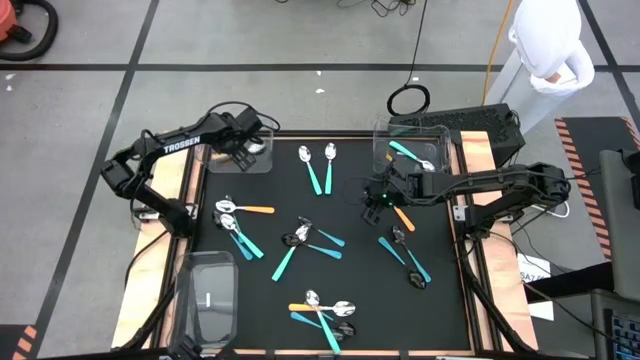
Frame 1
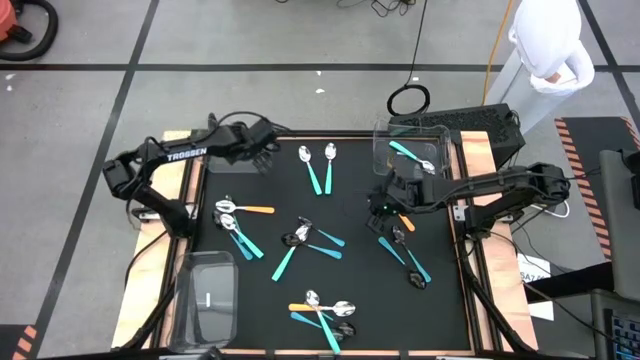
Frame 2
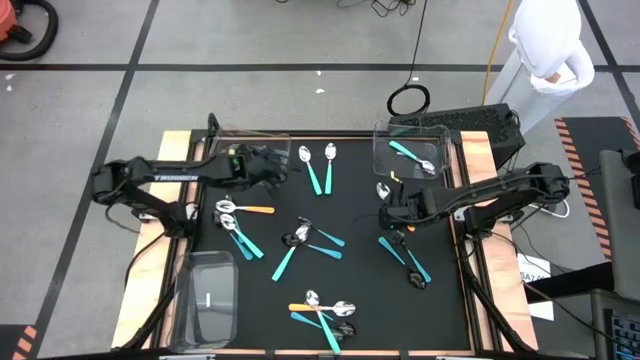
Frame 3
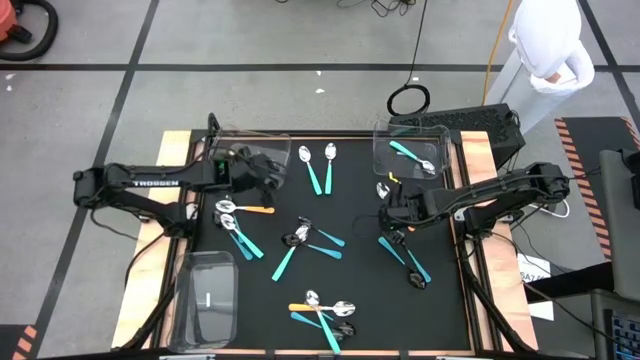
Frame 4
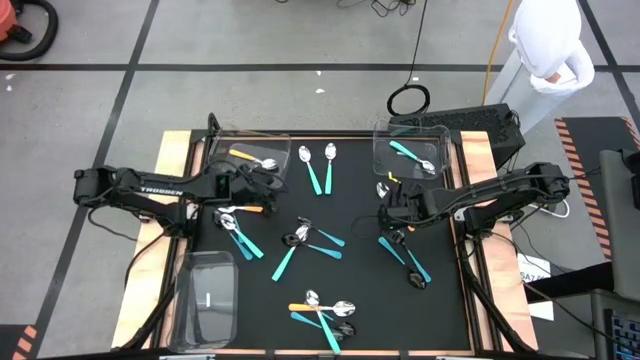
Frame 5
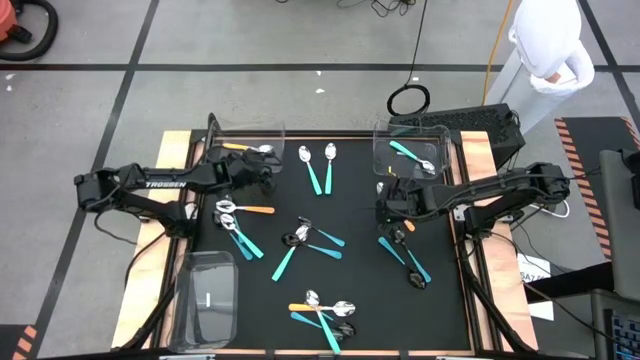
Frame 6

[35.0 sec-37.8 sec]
Task: Sort silverware by color (type)
Adjust the top left bin on the table

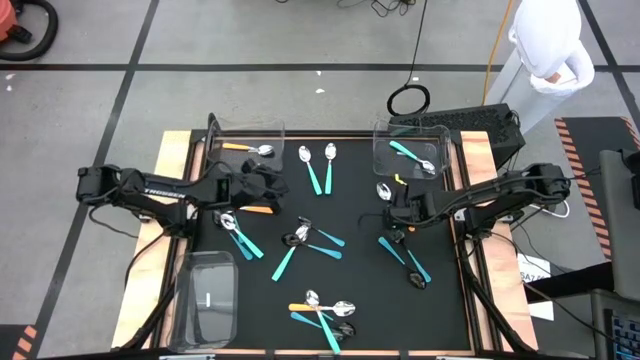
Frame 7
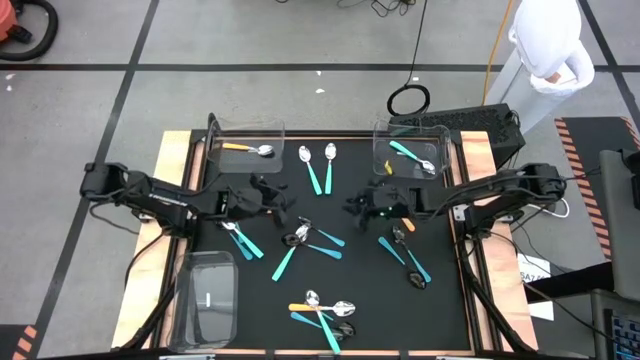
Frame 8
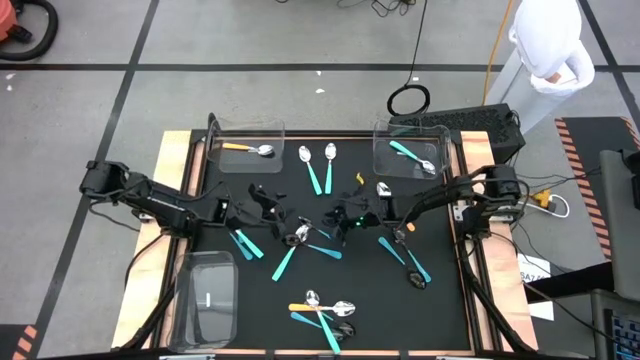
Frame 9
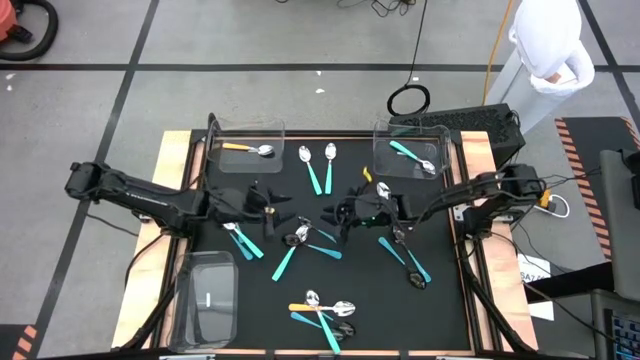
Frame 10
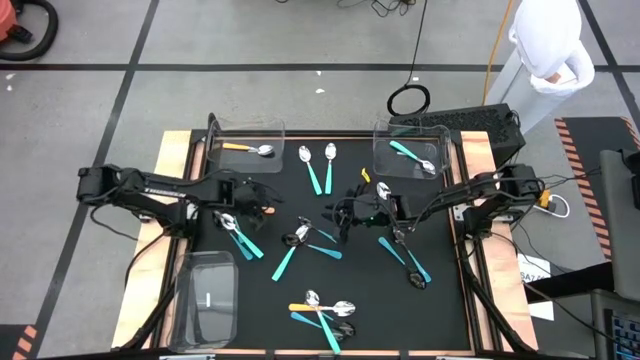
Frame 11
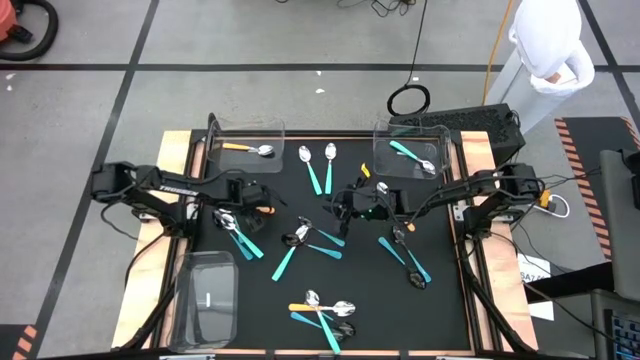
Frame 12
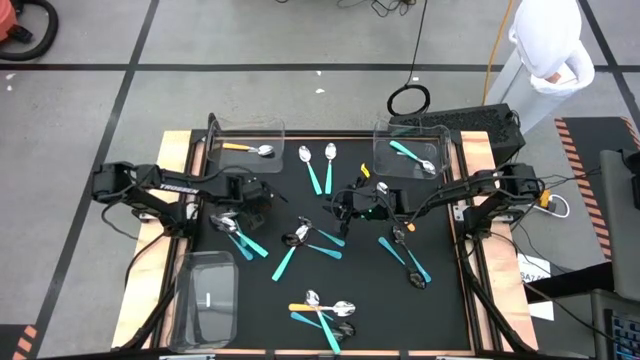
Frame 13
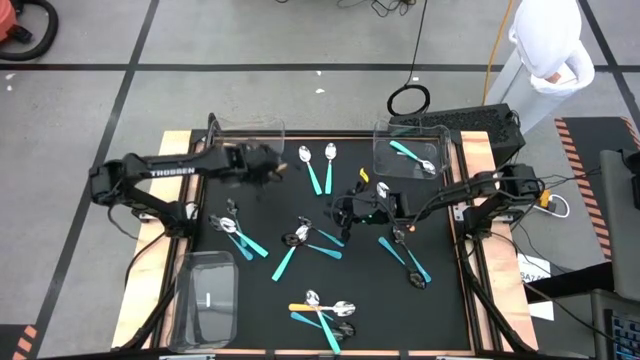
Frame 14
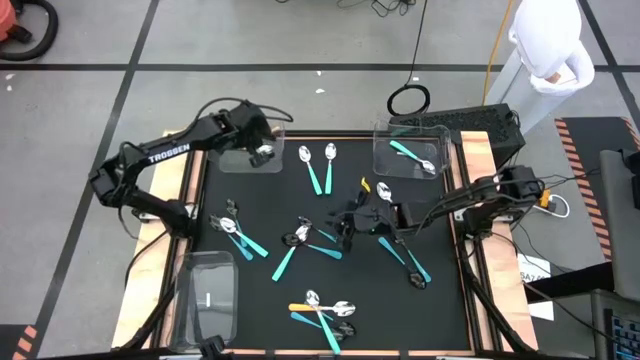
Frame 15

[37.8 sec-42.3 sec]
Put the top left yellow spoon into the top left bin

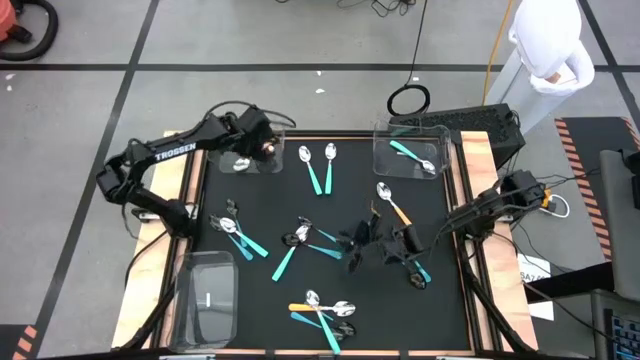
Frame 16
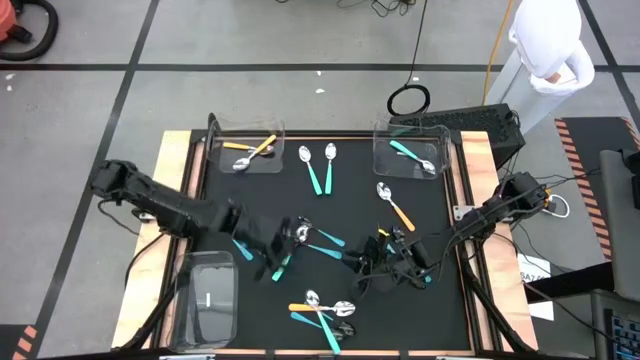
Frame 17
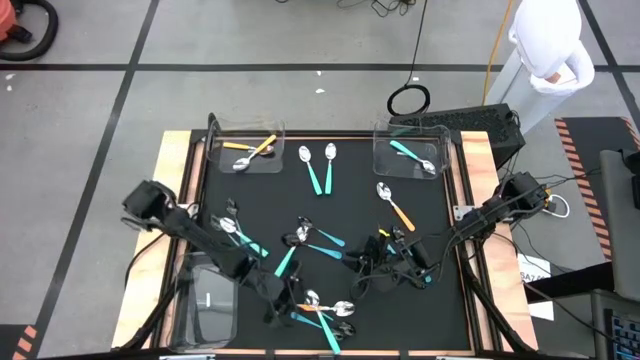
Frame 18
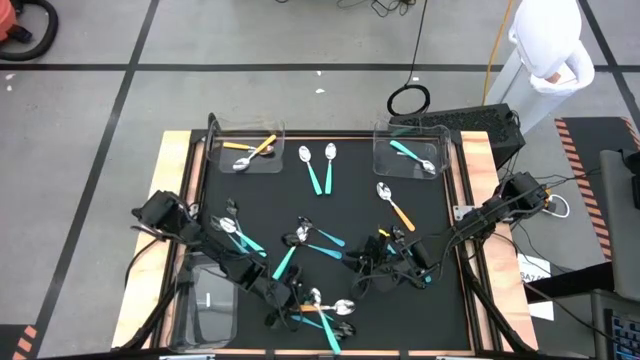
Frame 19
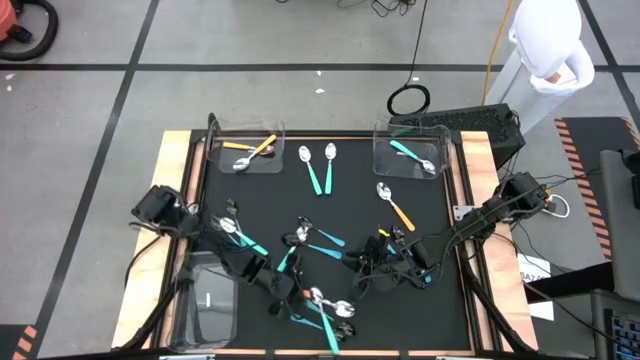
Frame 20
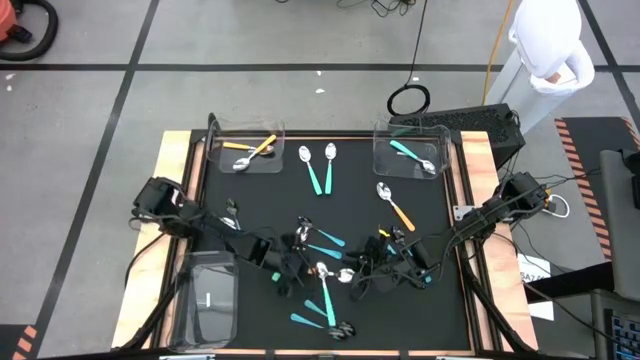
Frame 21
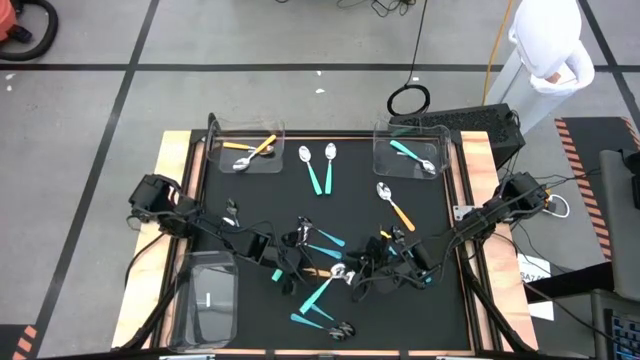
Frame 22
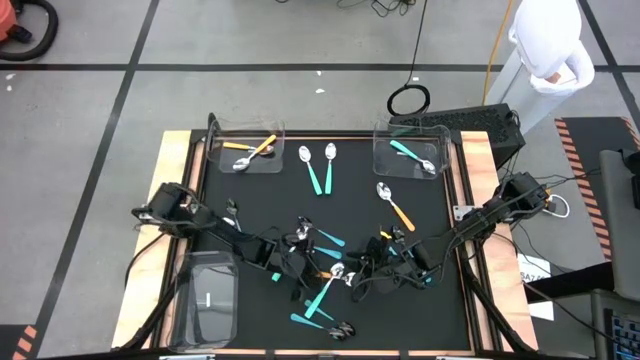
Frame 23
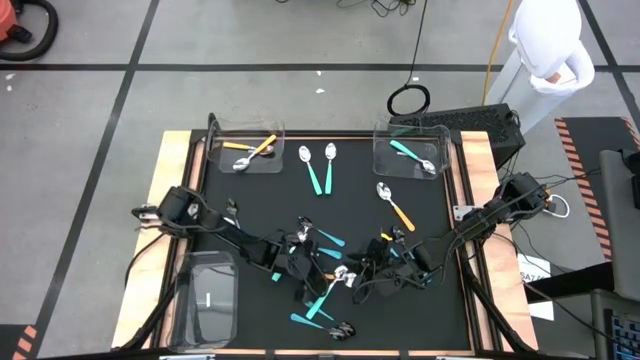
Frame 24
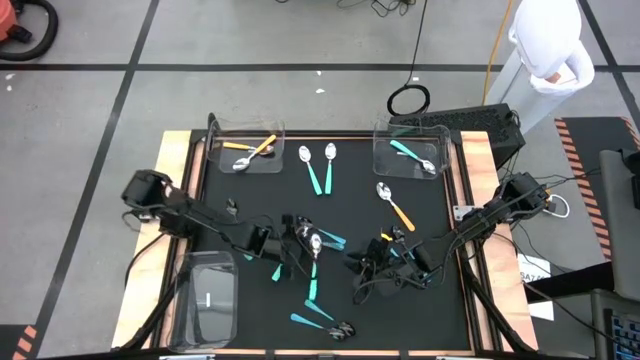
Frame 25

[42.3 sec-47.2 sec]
Put the bottom yellow spoon into the top left bin

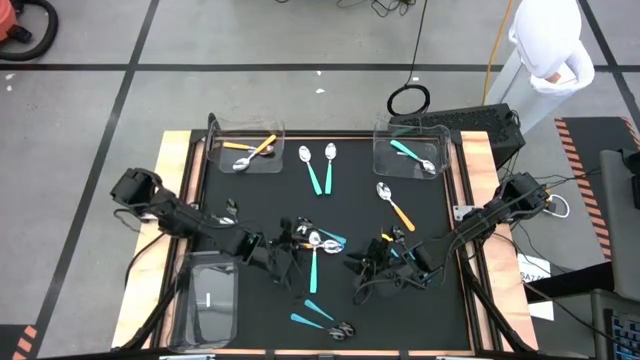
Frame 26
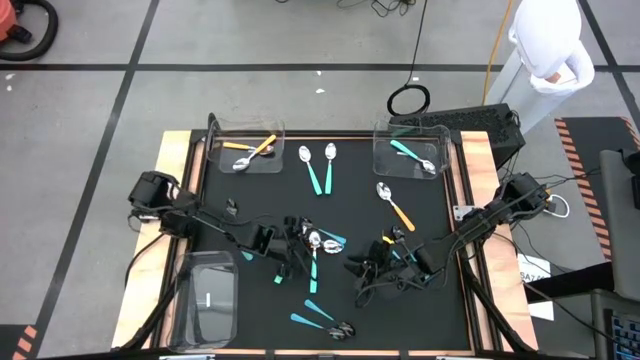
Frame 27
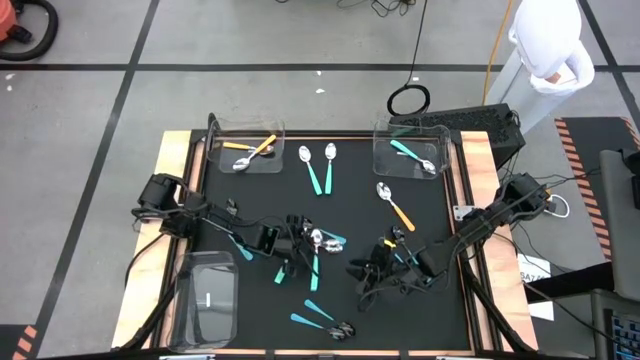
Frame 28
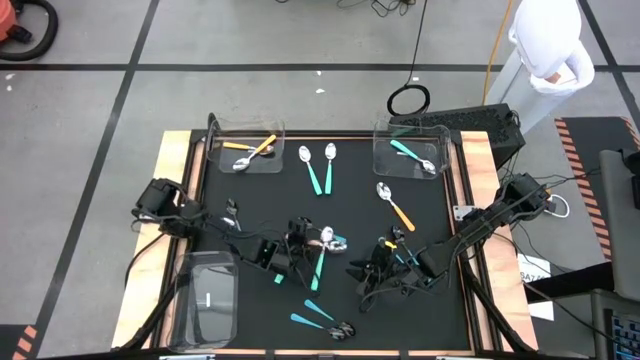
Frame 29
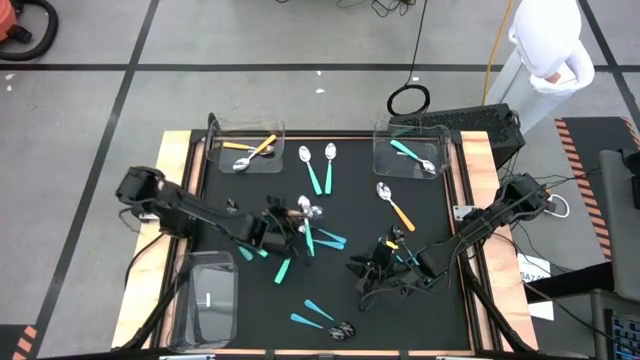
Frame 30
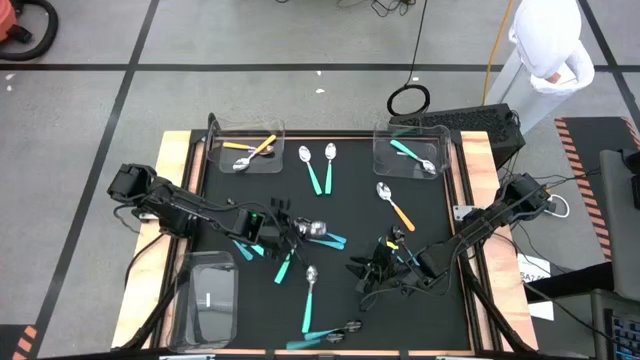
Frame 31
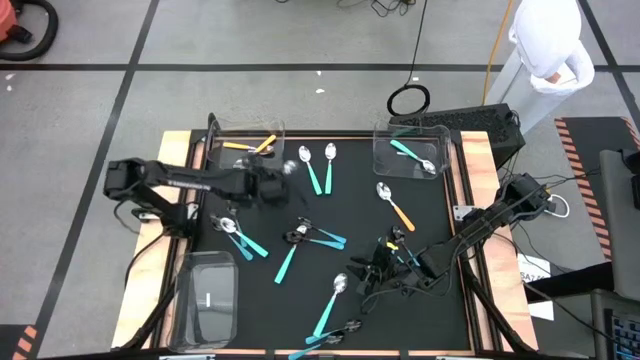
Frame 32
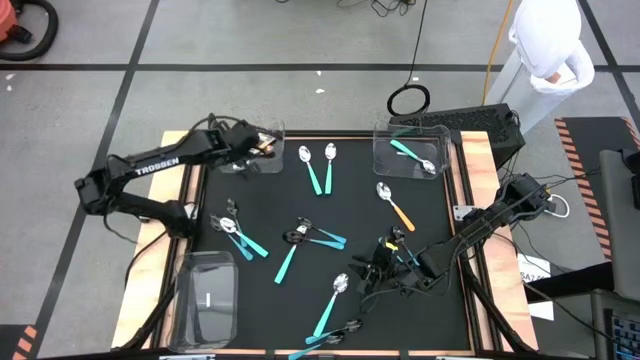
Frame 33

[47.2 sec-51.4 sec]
Put the bottom yellow spoon into the top left bin

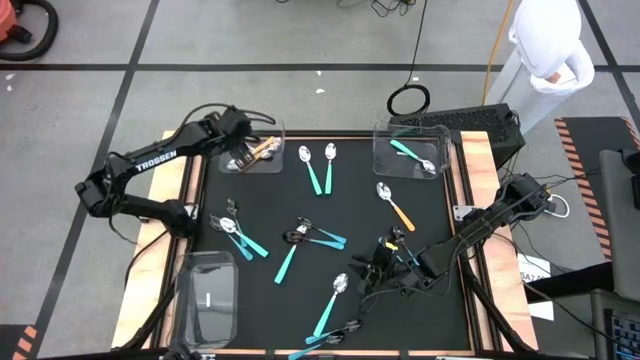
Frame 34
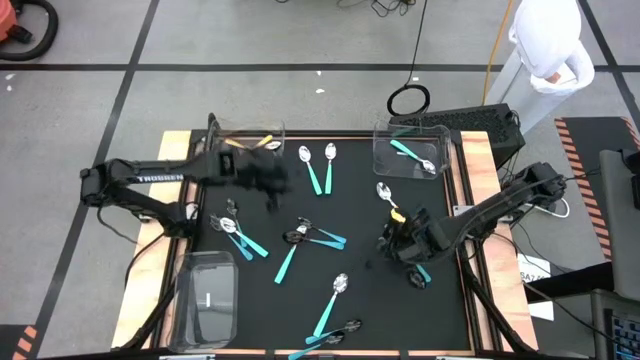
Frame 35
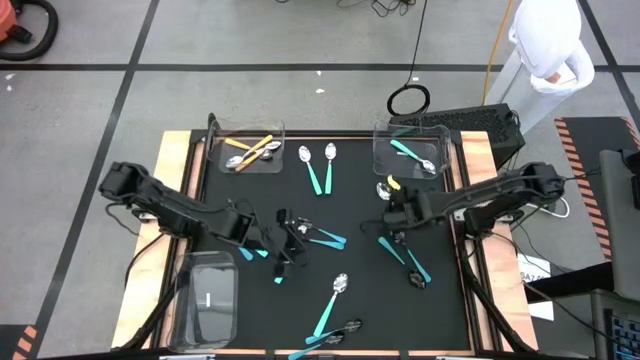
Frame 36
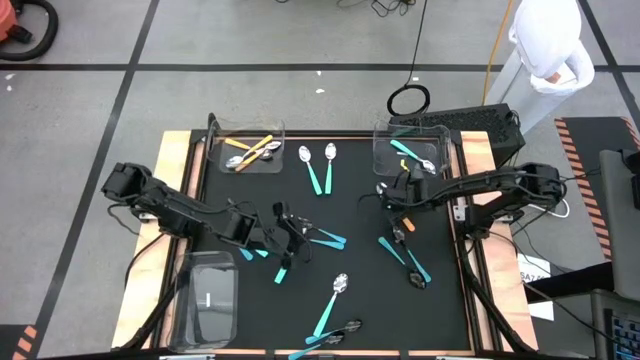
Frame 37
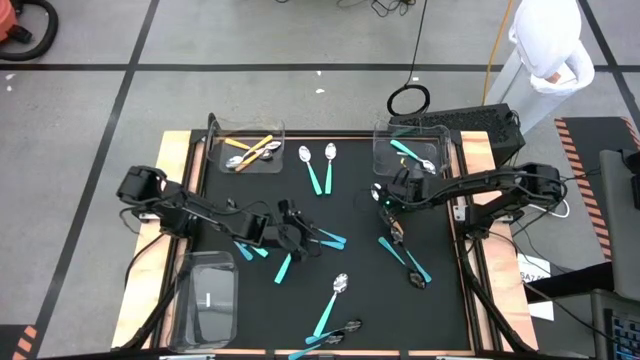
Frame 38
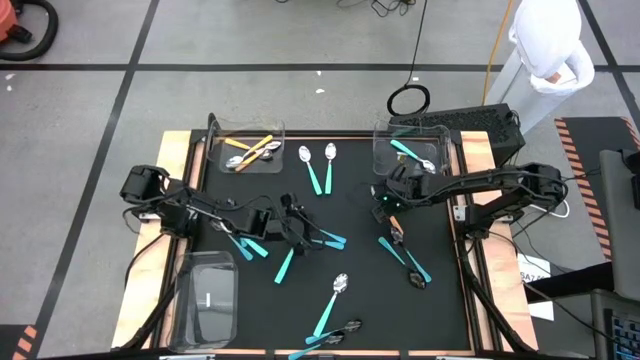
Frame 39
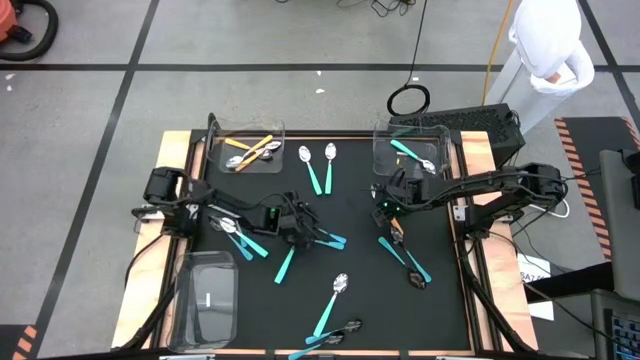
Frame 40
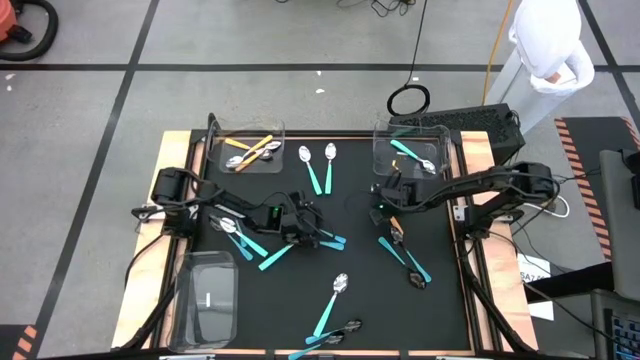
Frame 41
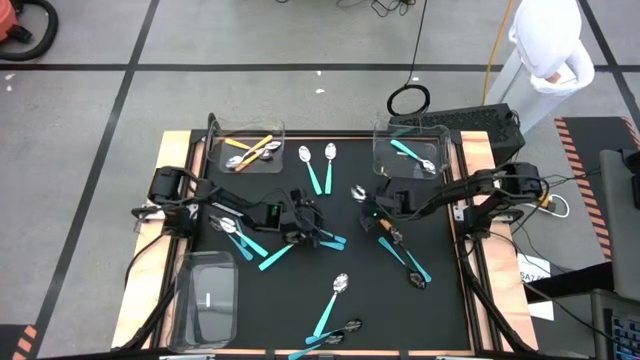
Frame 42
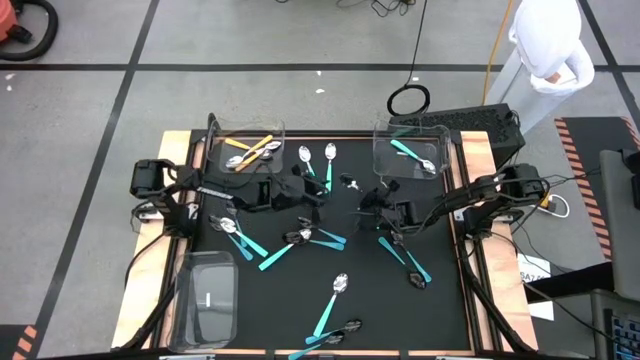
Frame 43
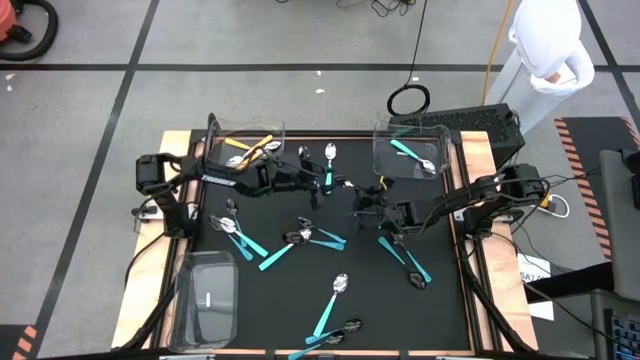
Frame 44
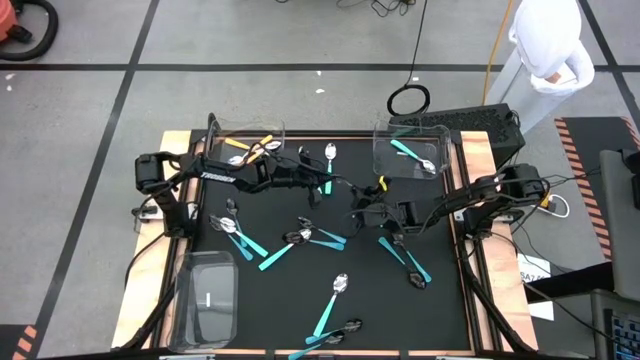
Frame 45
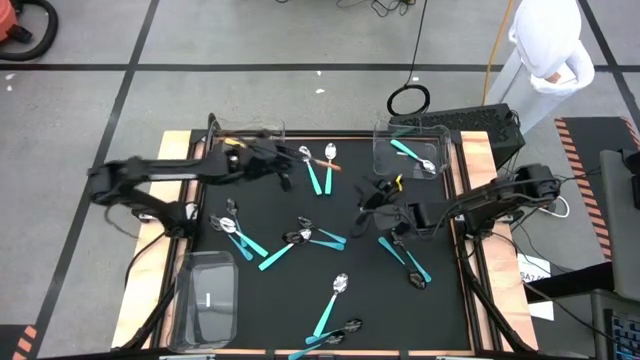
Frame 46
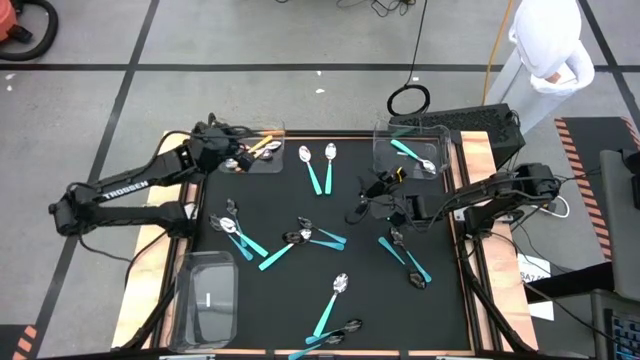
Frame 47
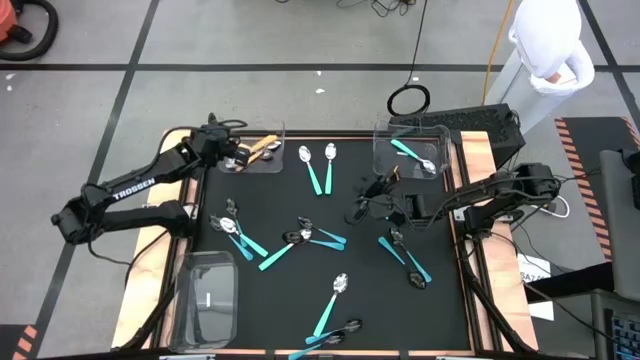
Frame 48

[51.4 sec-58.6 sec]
Put the yellow spoon into the top left bin
